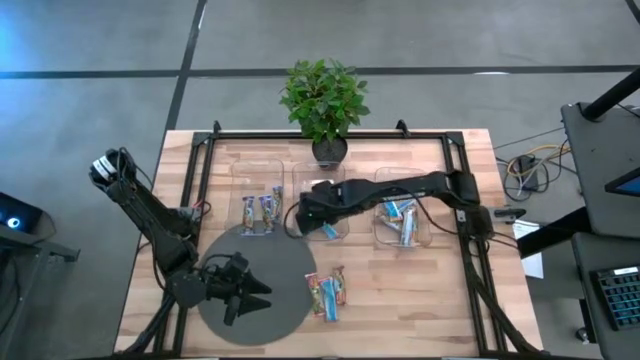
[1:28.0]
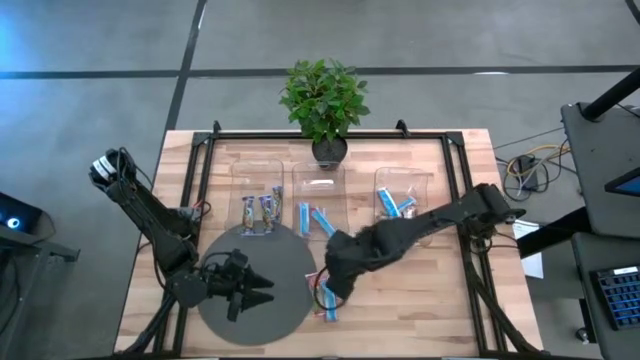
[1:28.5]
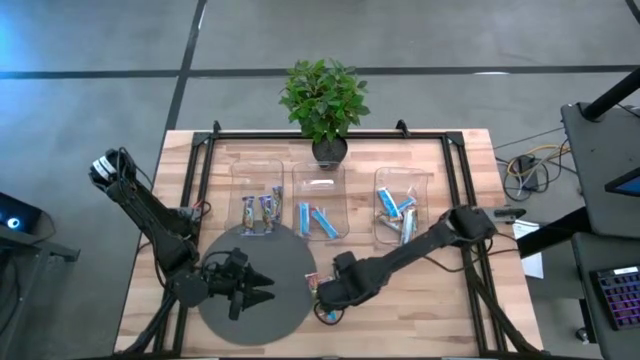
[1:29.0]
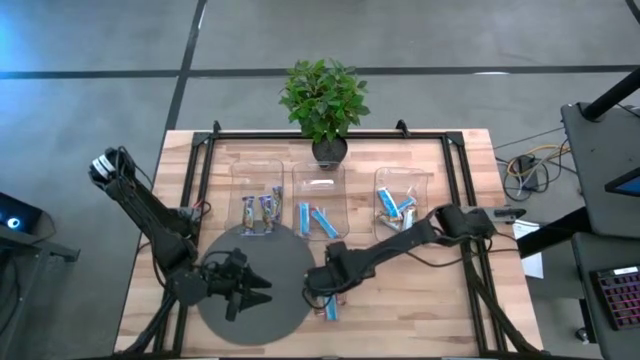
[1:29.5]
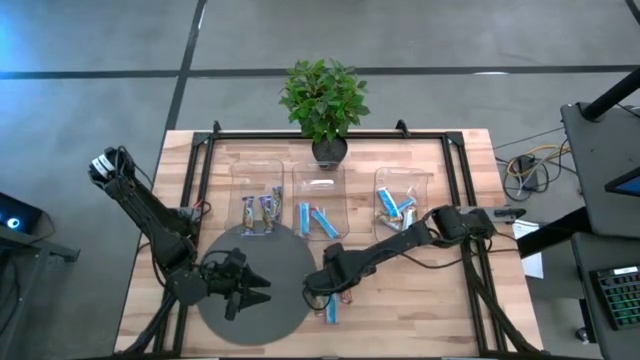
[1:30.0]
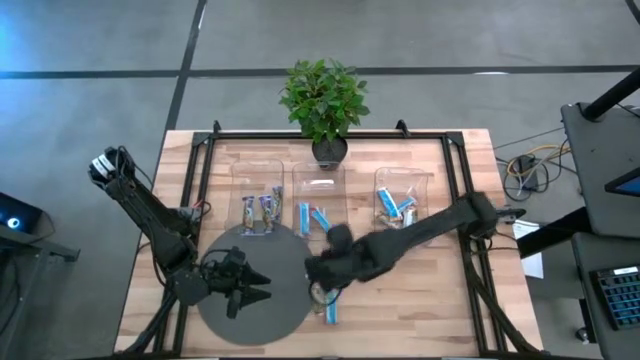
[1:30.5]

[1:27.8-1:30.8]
Task: Pick and place Granola Bars by type
Put the red granola bar into the middle transparent bin

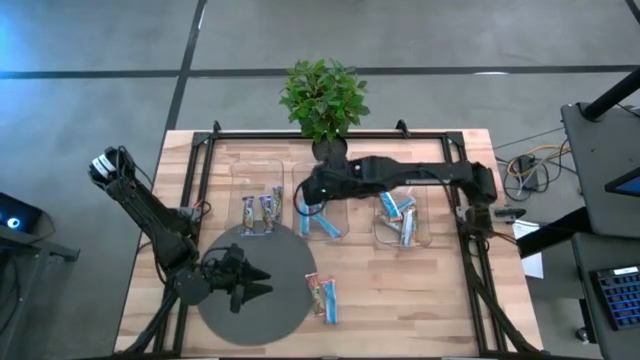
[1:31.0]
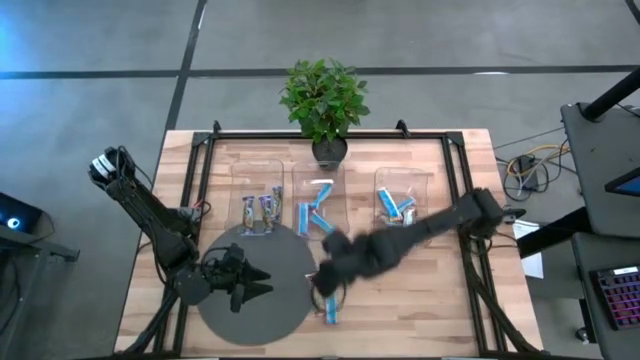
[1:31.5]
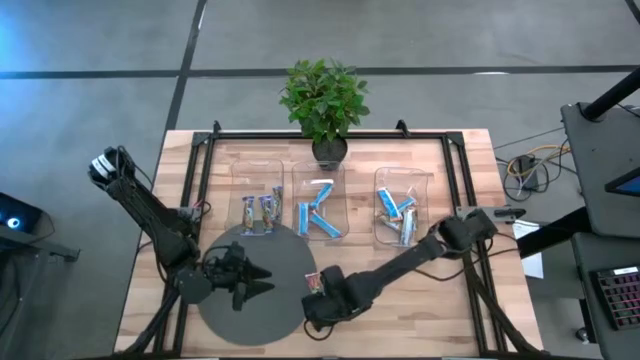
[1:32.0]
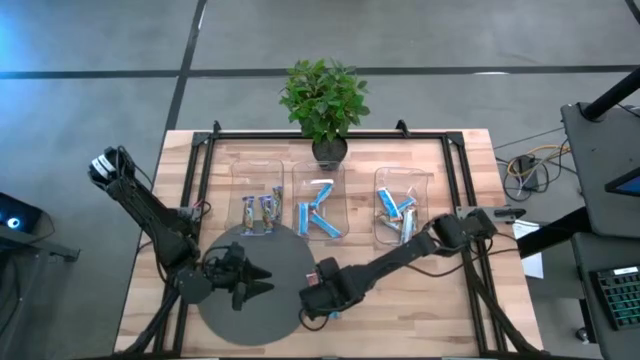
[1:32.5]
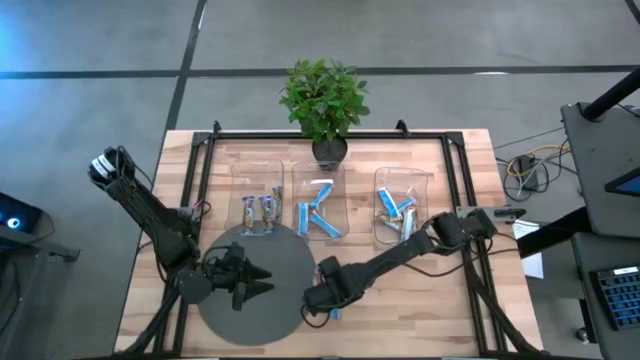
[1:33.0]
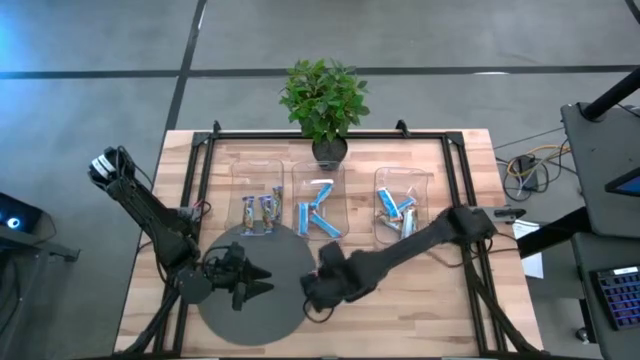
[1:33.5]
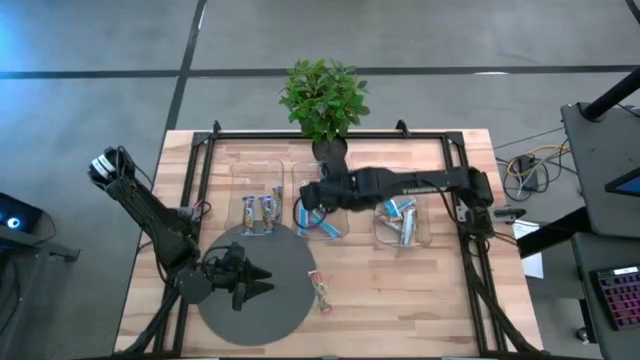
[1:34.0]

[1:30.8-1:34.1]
Put the red granola bar into the middle transparent bin

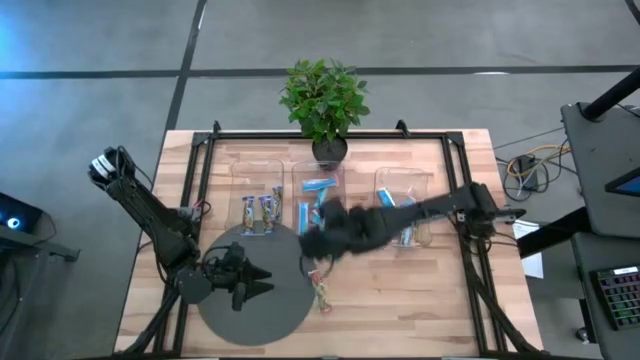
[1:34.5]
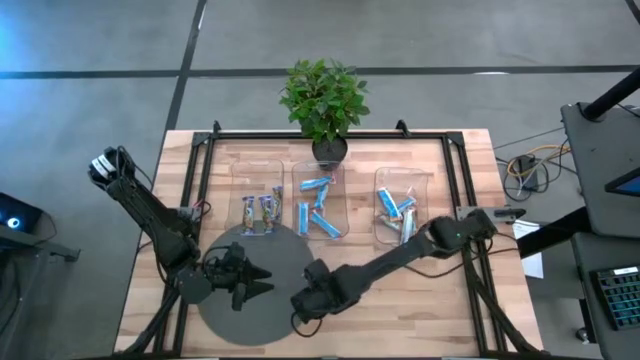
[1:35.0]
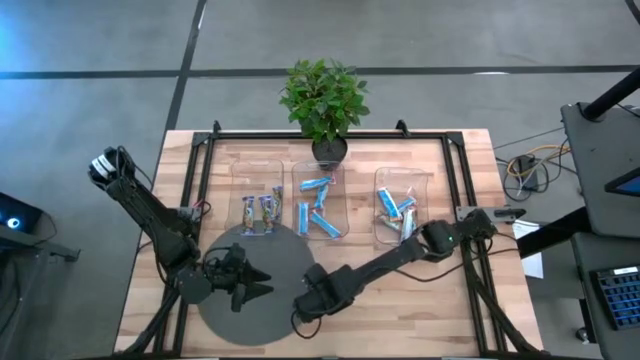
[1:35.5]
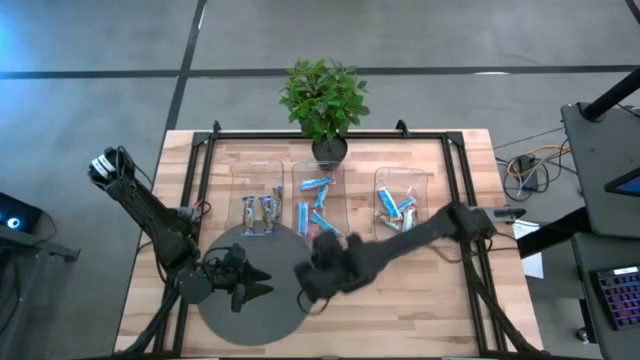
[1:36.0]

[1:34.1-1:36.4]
Put the red granola bar into the middle transparent bin

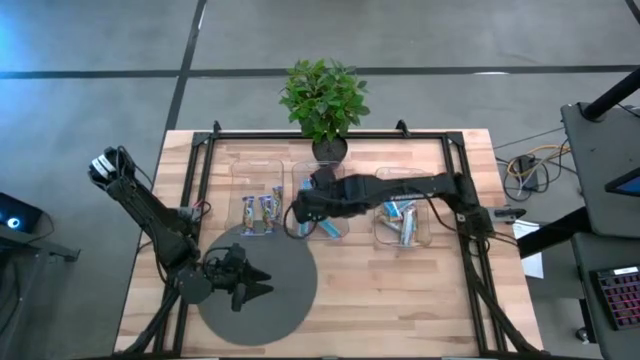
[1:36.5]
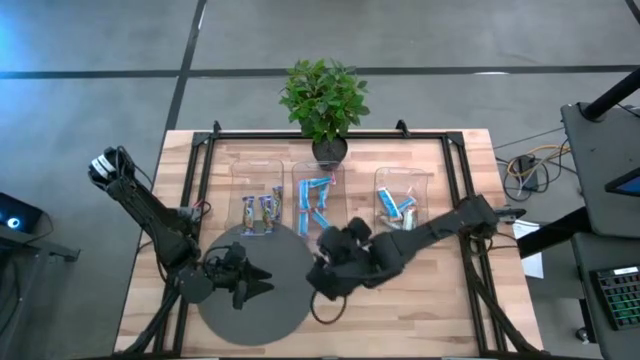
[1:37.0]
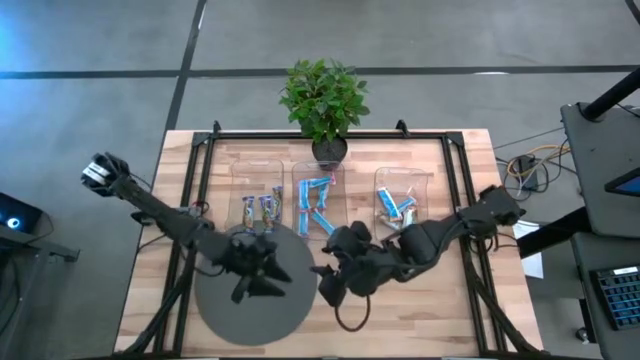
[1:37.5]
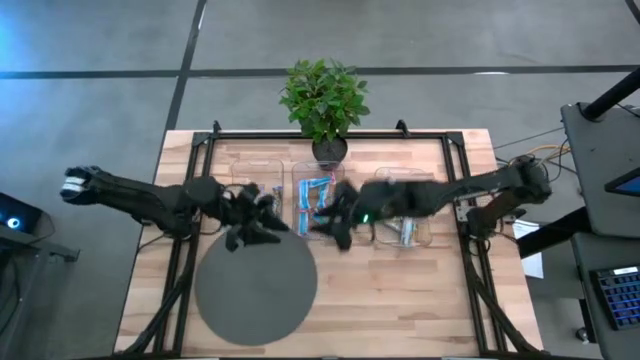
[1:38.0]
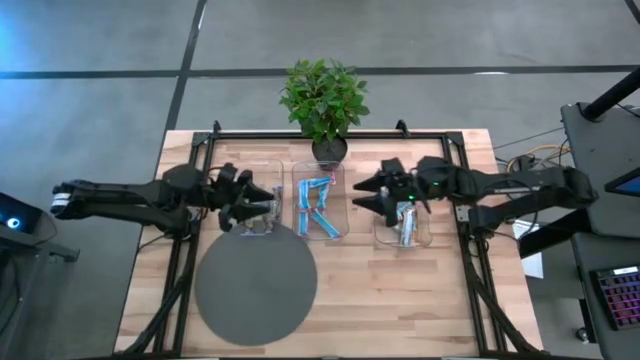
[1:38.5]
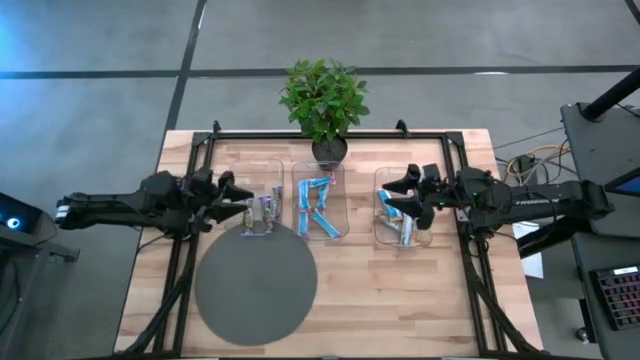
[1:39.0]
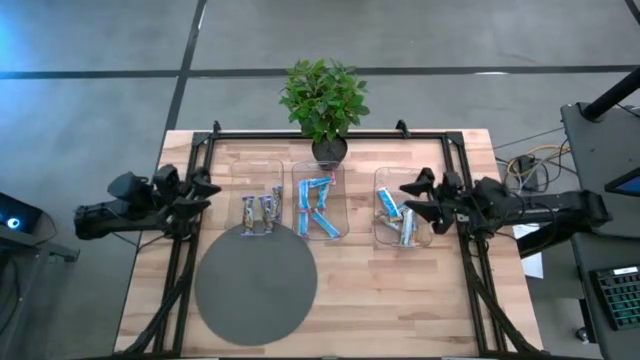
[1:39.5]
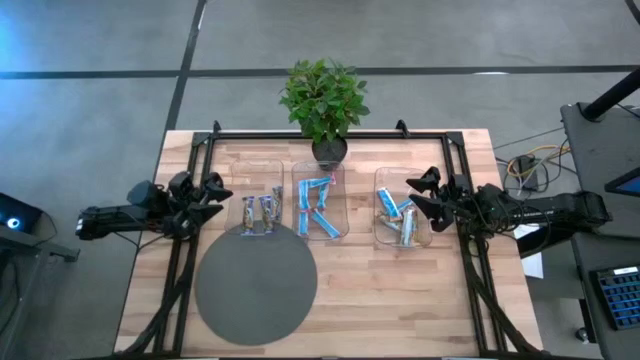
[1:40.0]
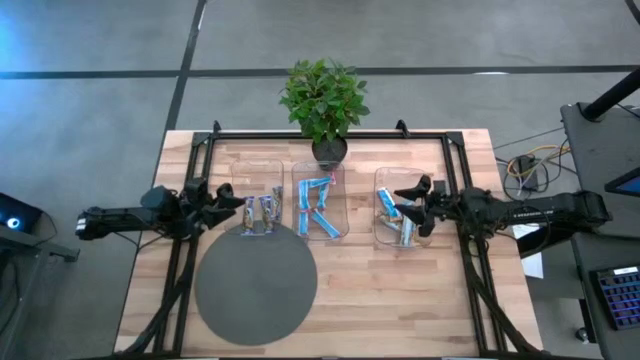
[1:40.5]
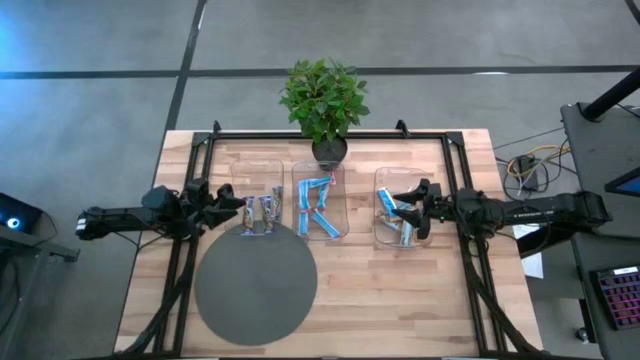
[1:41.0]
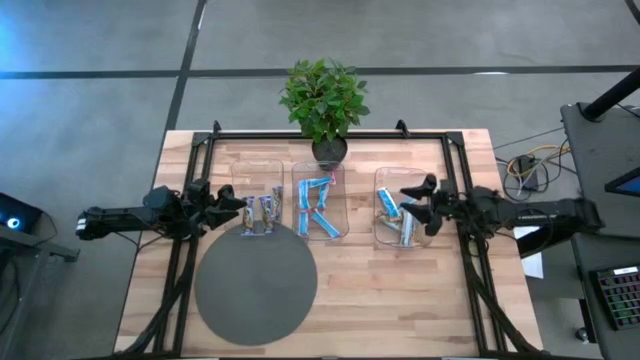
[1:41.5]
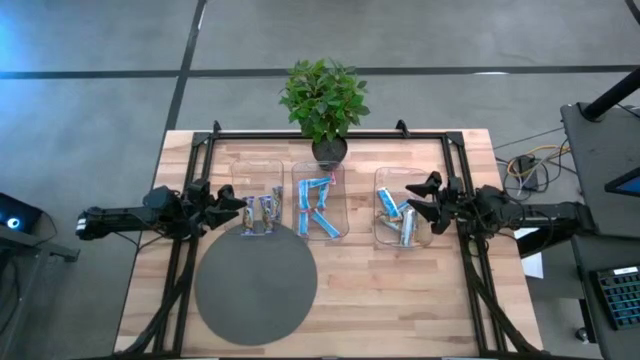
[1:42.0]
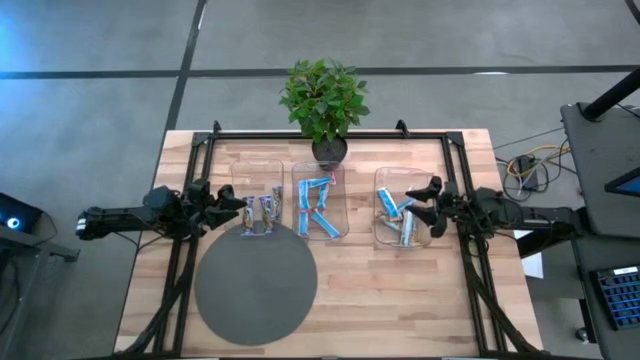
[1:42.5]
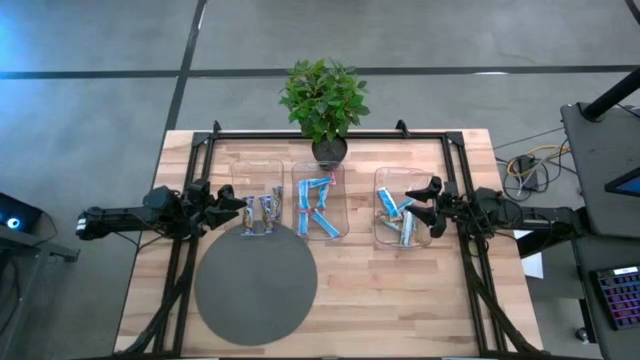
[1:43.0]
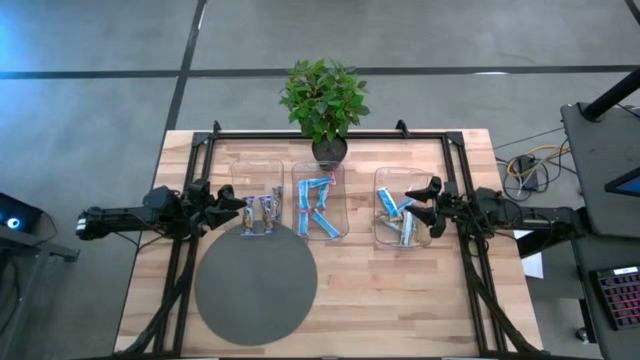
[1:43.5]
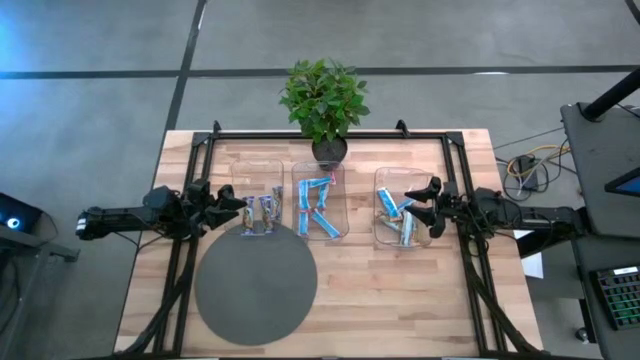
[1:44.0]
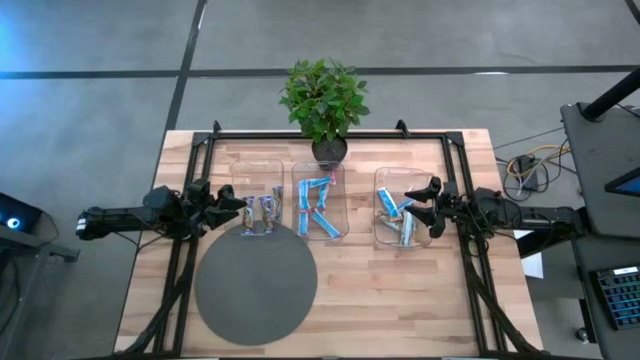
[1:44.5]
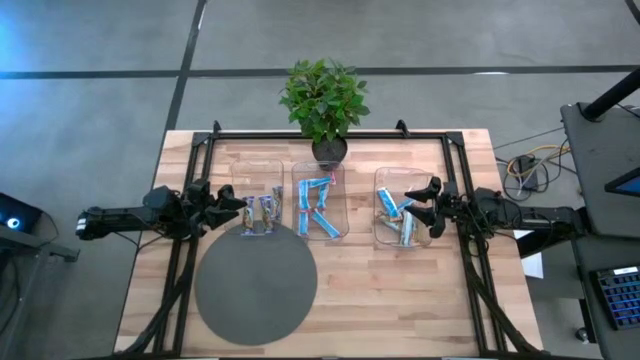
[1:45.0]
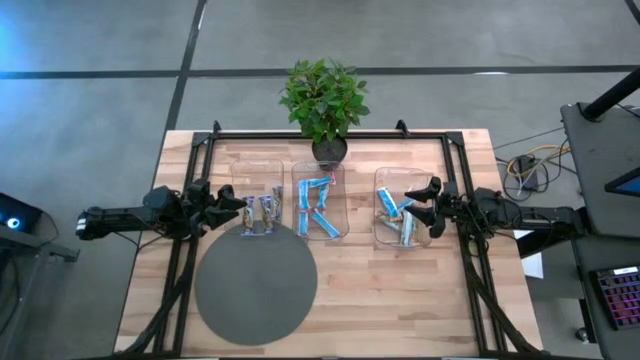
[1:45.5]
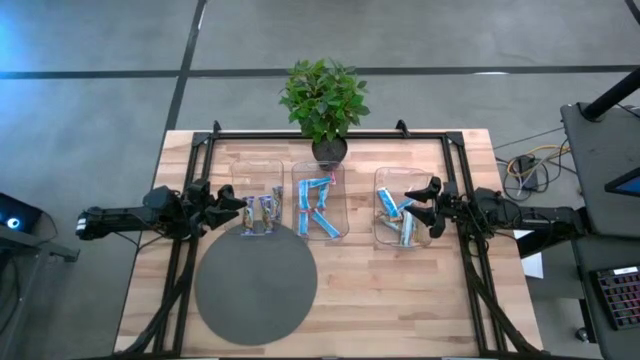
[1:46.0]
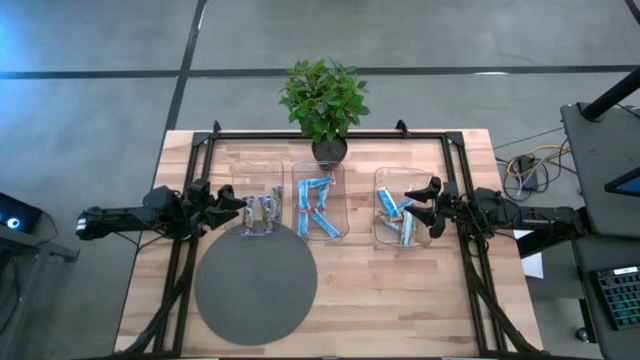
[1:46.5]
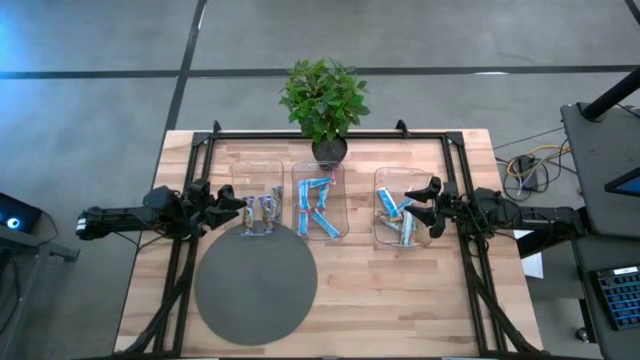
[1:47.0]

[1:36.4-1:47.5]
Return to Home Position
